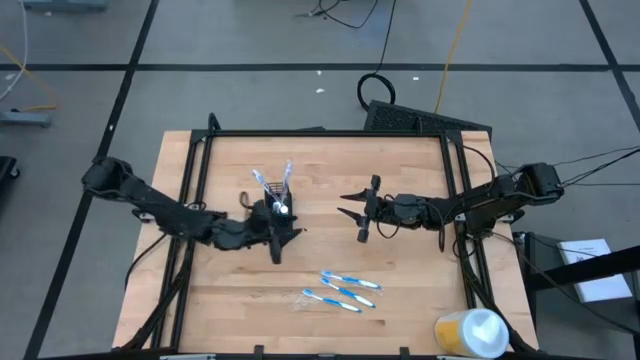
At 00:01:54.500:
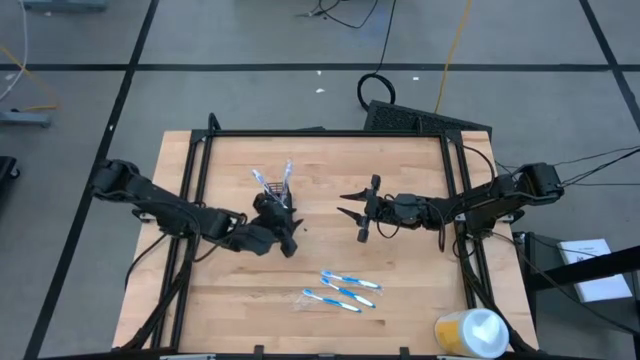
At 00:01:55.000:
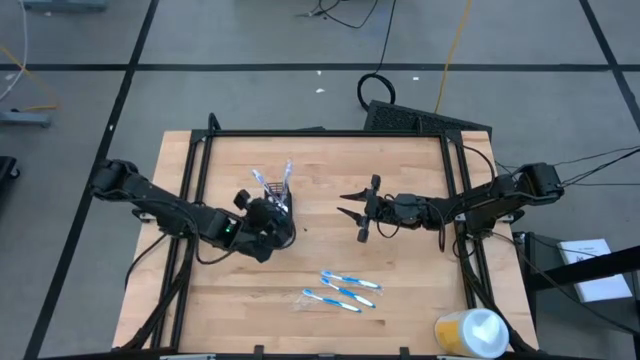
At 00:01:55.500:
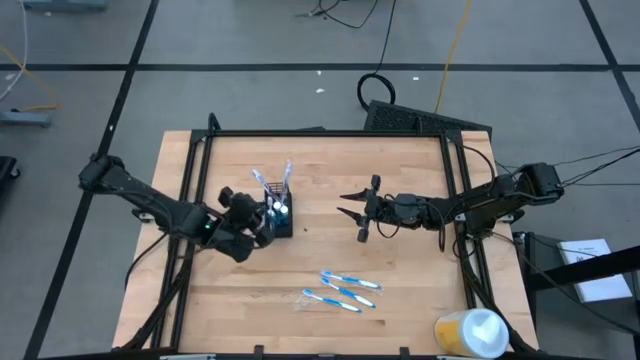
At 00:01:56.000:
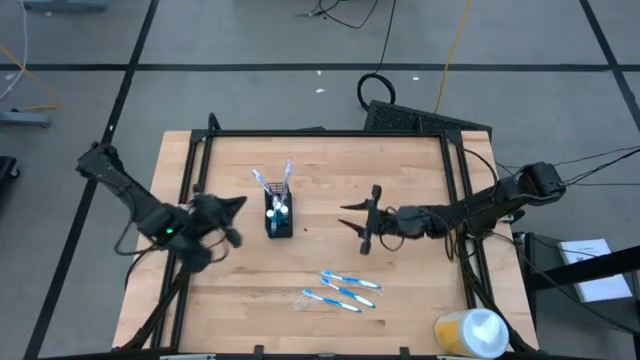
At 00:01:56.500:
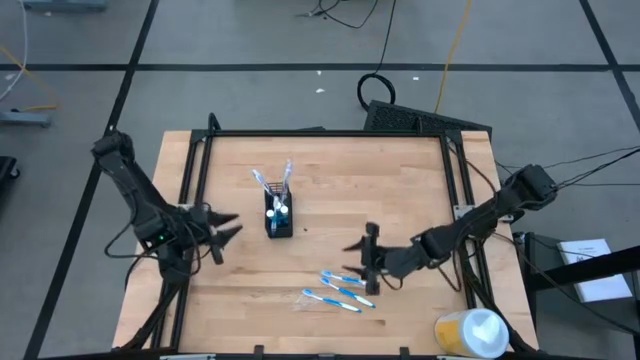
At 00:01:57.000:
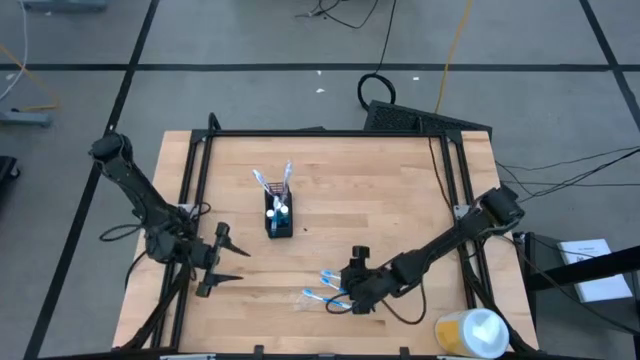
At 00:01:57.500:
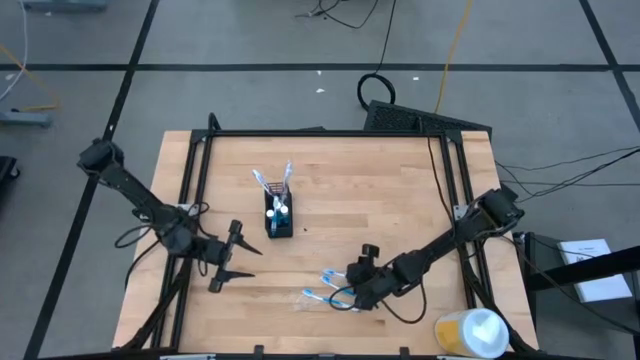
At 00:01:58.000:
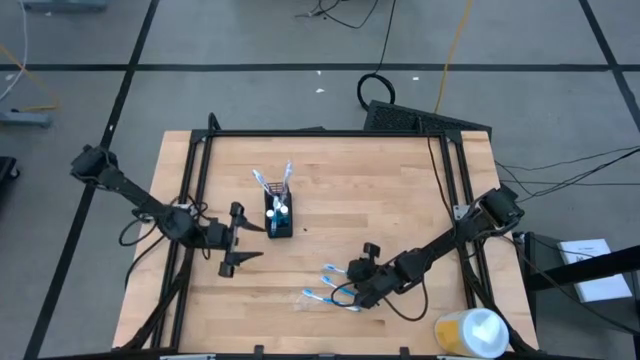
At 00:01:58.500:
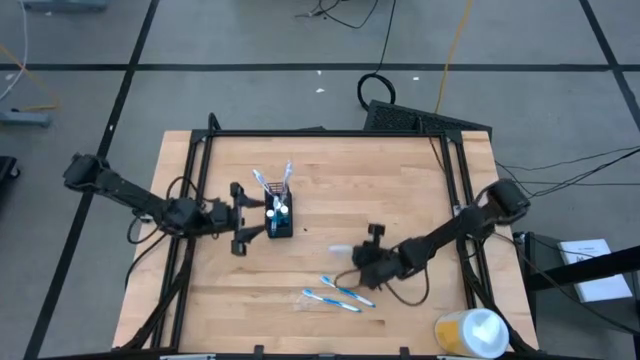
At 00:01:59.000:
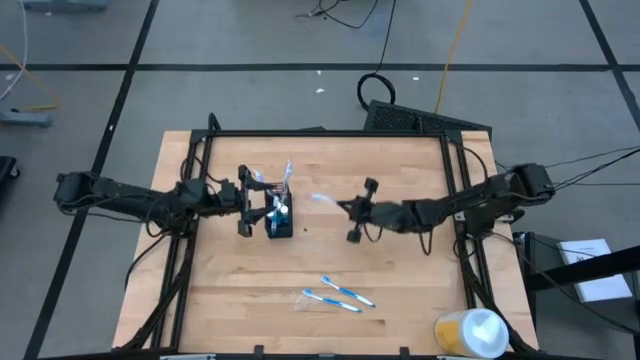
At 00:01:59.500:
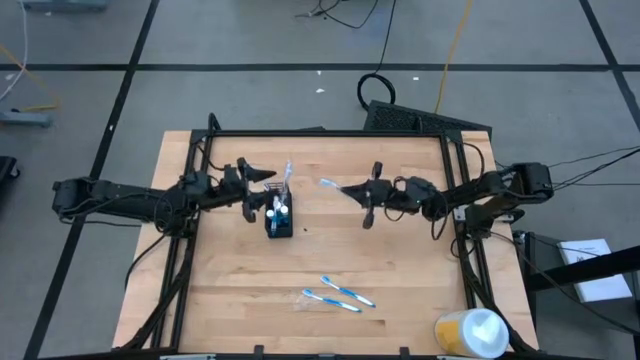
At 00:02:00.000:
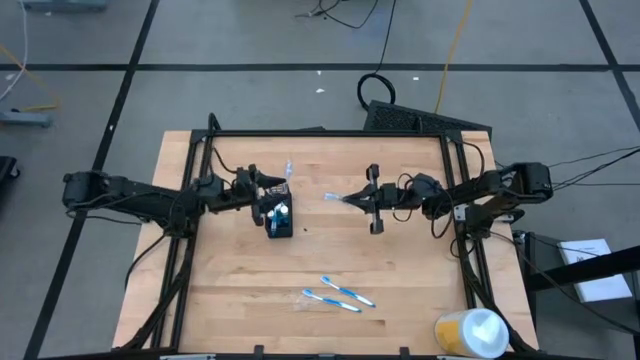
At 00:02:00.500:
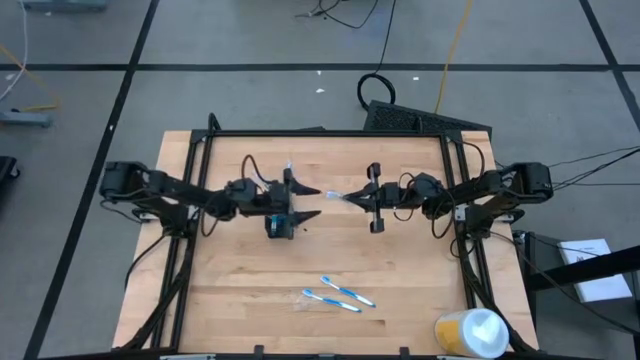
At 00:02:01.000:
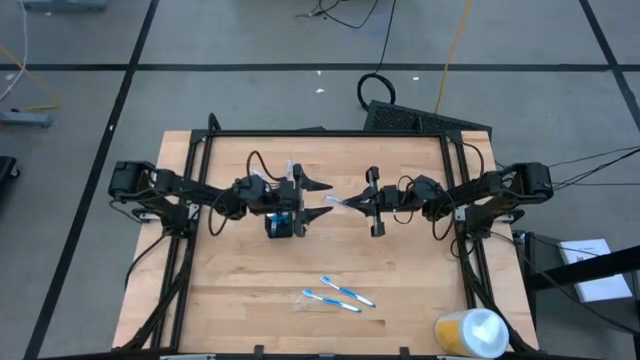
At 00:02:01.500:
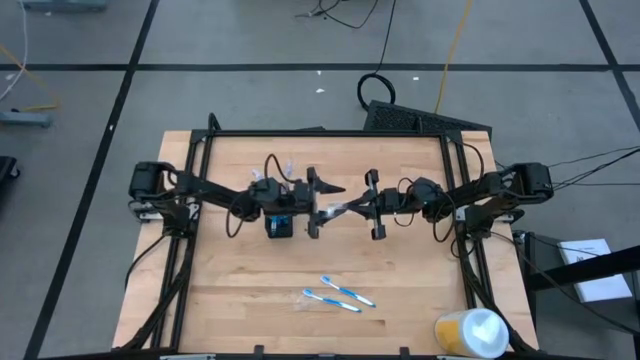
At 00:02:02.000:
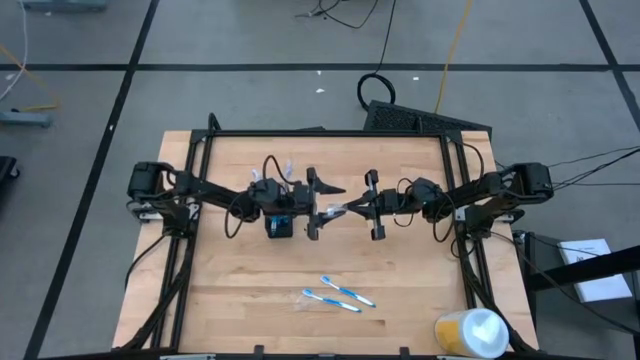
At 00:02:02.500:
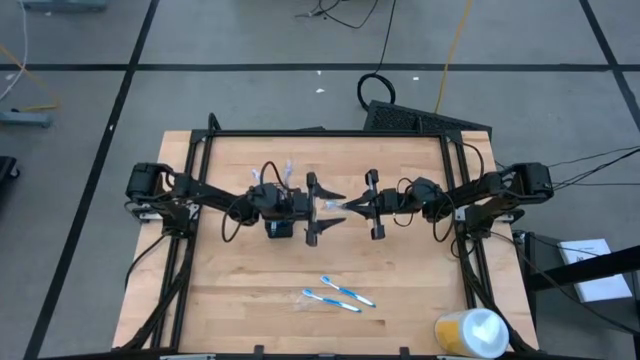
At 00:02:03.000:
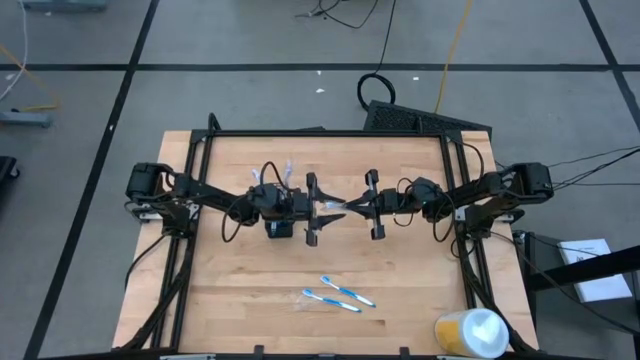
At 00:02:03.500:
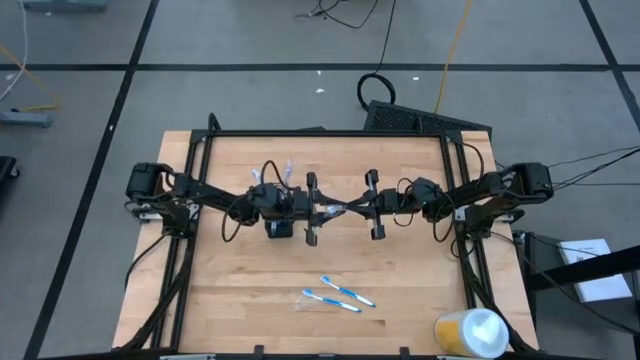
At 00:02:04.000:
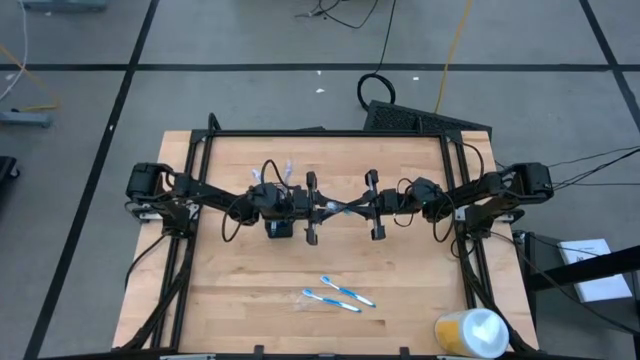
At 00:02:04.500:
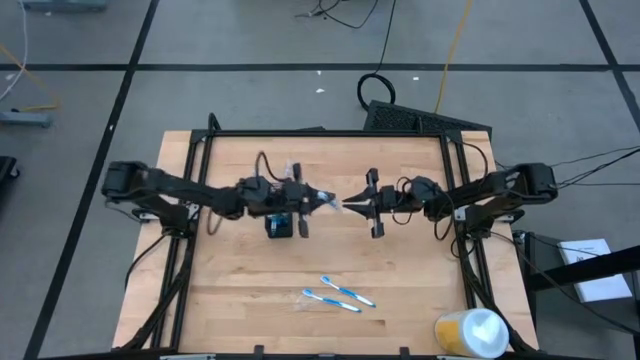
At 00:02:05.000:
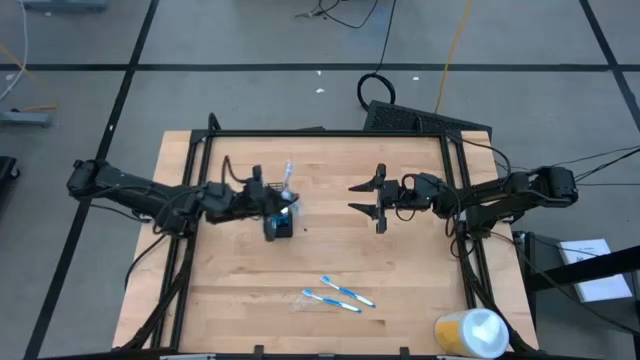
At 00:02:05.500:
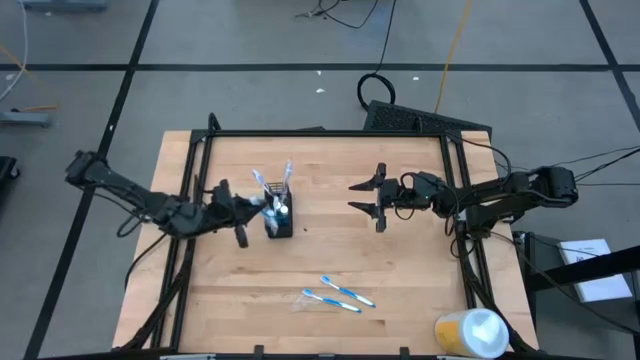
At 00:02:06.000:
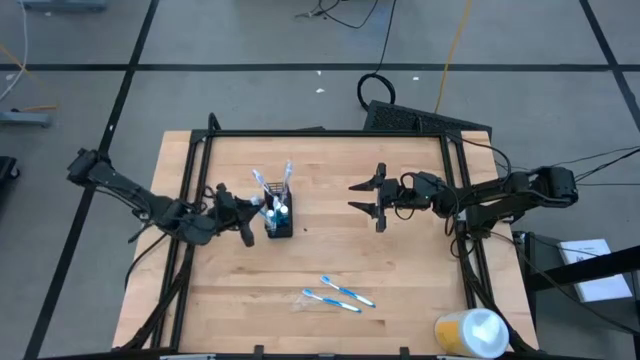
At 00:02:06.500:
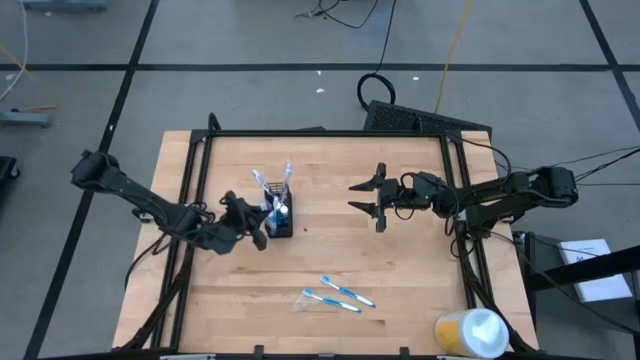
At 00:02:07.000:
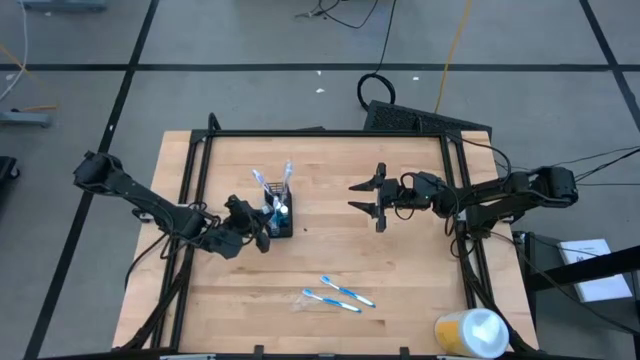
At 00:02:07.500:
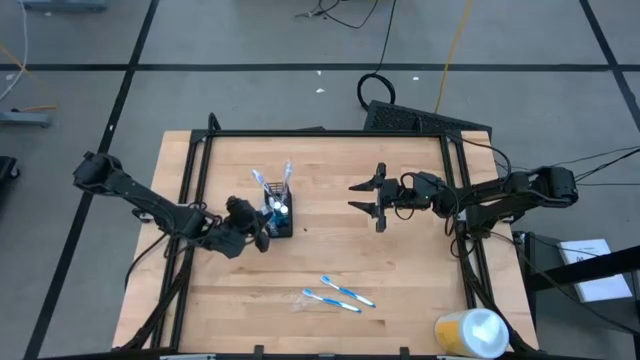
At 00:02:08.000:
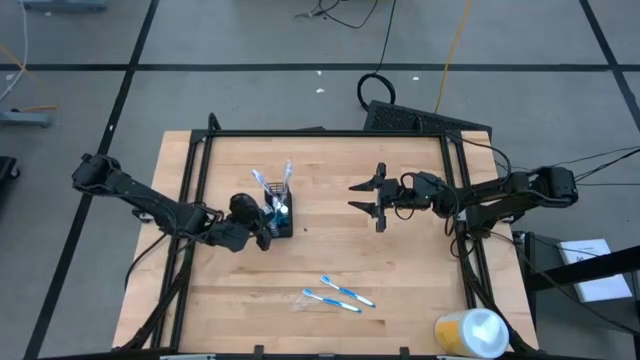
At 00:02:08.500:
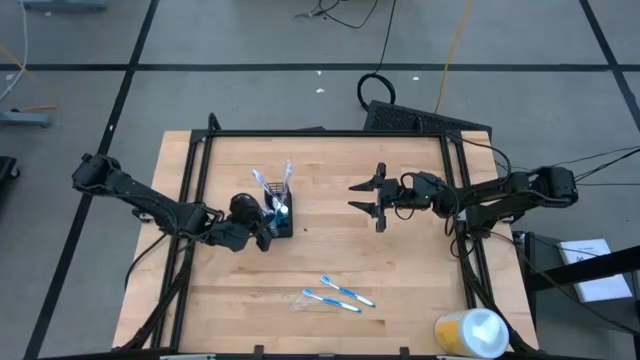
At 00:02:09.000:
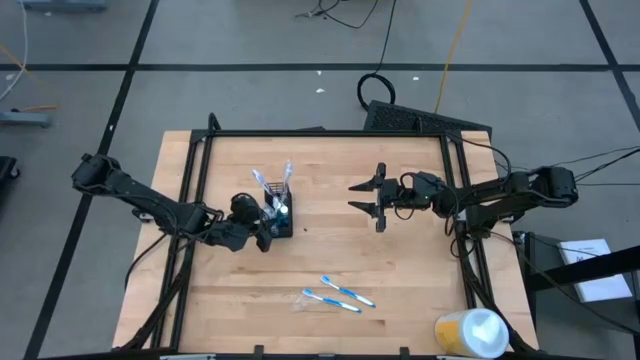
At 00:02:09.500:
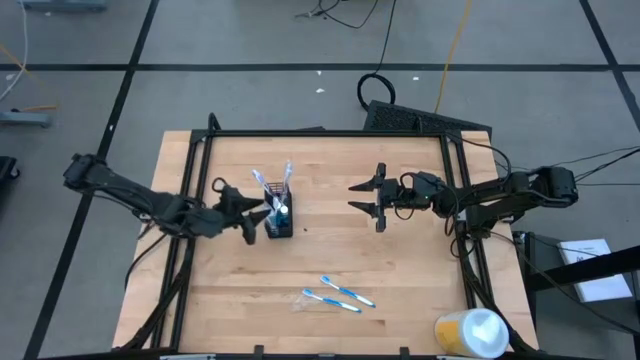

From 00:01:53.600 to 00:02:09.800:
Task: Pick & Place toothbrushing station
Put the blue toothbrush into the black organizer

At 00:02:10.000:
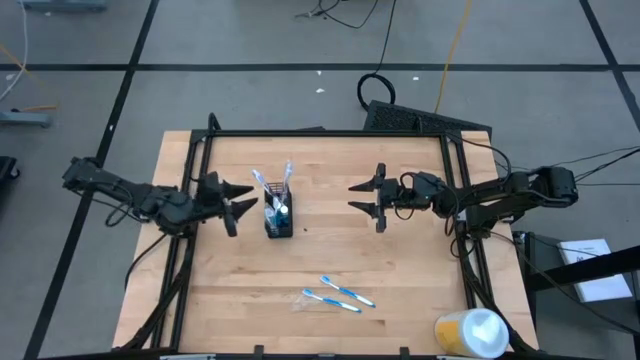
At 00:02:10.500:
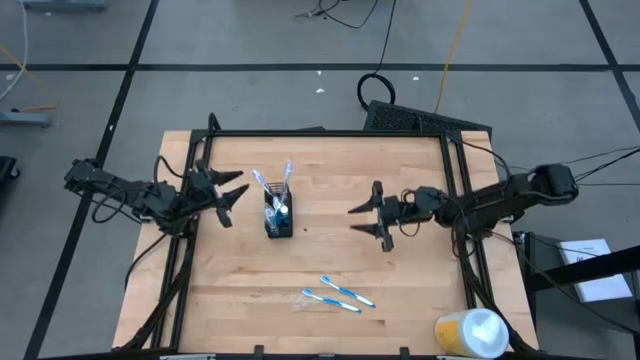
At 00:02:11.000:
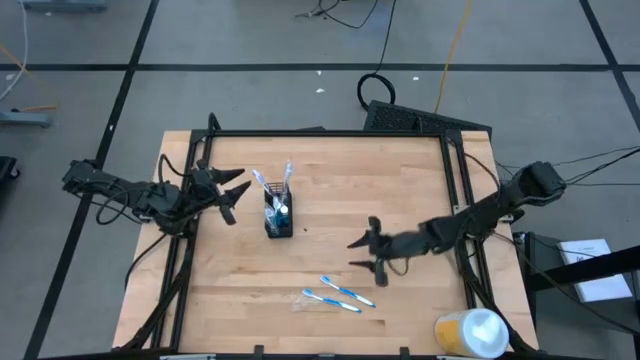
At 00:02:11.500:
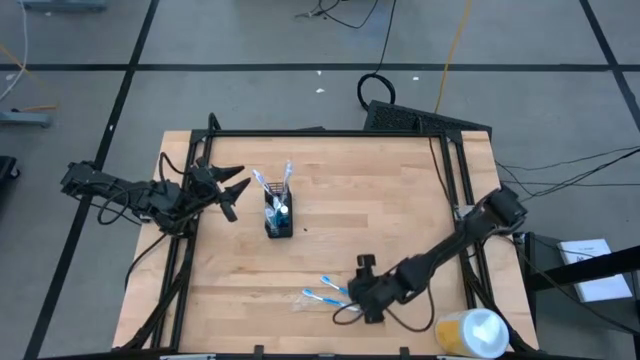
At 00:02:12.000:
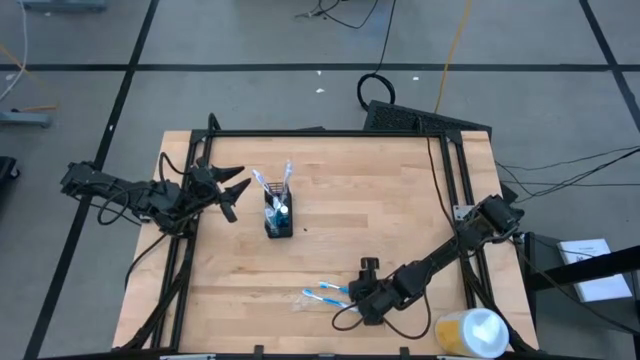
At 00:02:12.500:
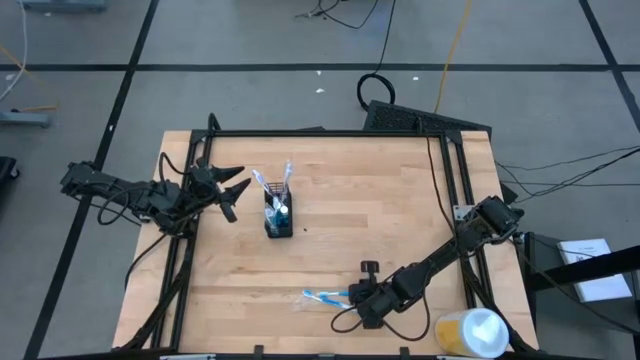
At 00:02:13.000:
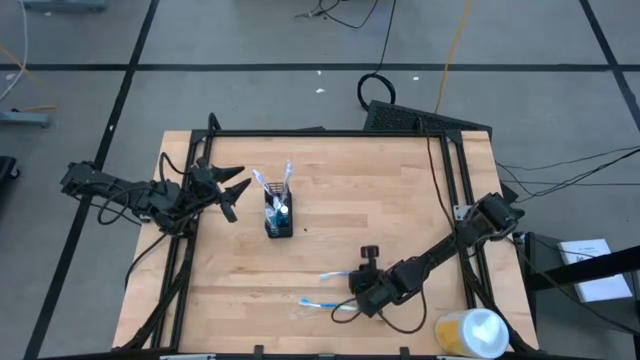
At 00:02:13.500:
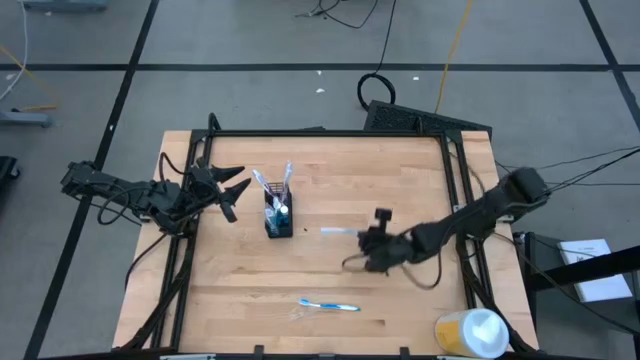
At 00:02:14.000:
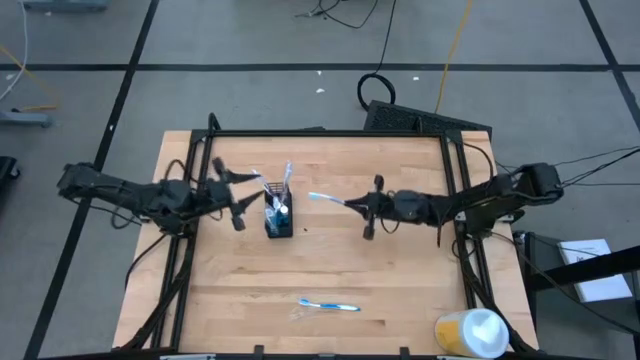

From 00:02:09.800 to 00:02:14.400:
Put the blue toothbrush into the black organizer

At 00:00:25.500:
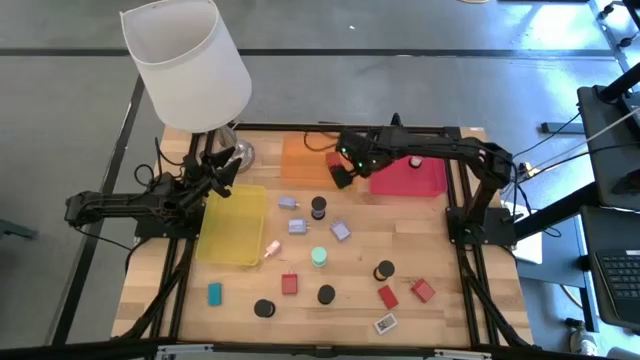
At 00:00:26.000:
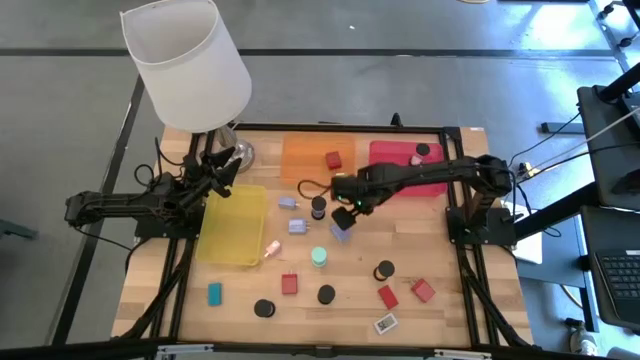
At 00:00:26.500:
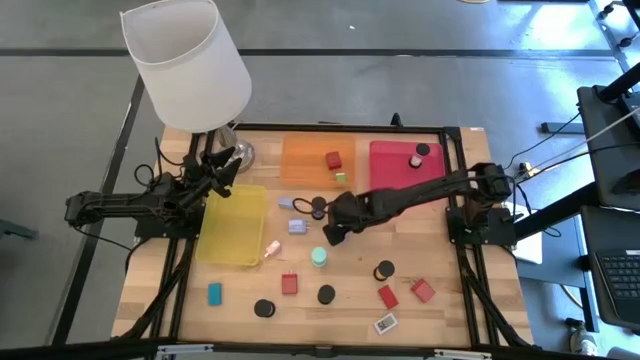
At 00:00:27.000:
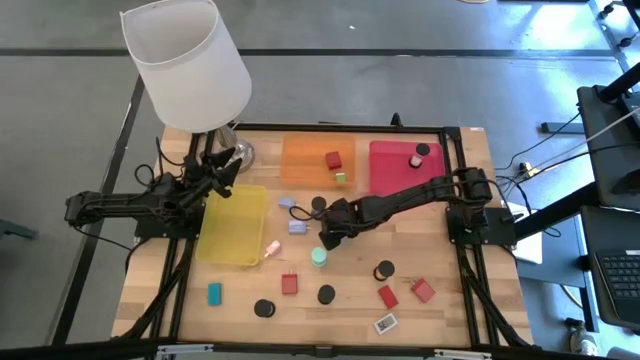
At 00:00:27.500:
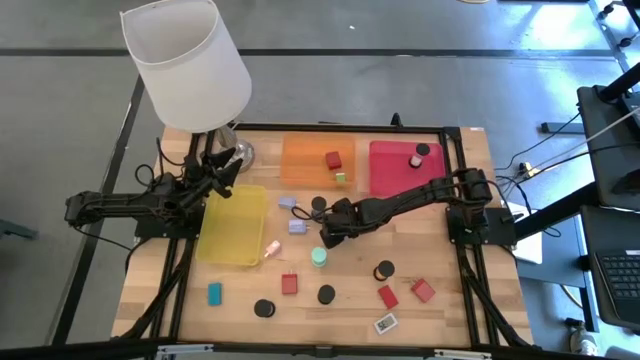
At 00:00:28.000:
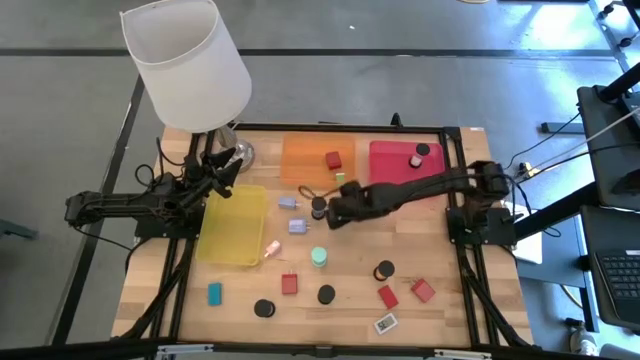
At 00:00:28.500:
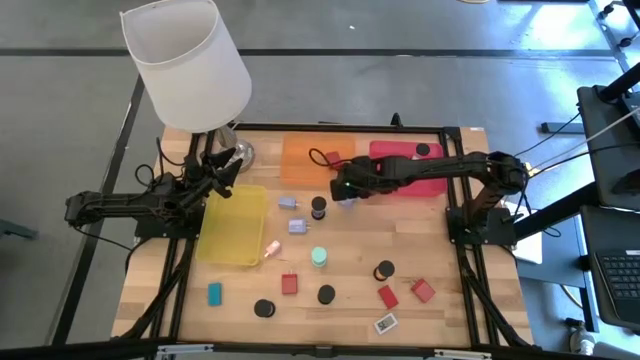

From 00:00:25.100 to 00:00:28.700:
Task: Pick & Place Office items
Put the blue charger adapter into the orange bin
